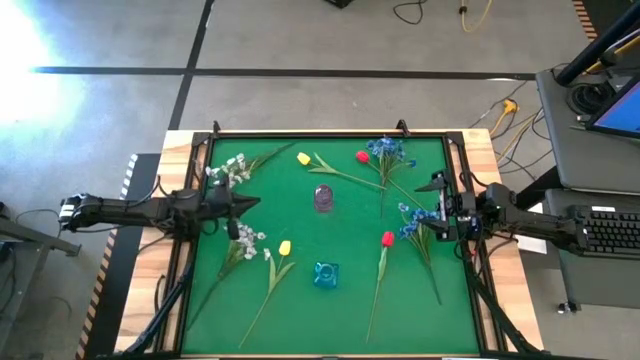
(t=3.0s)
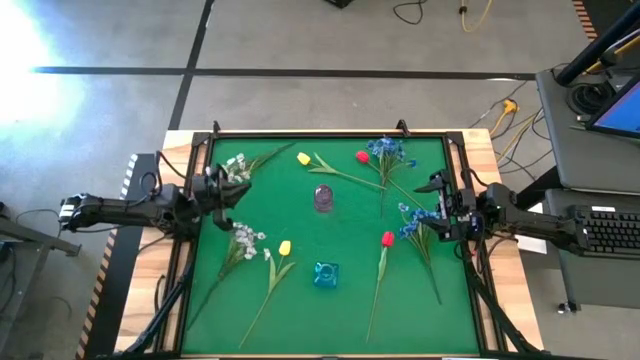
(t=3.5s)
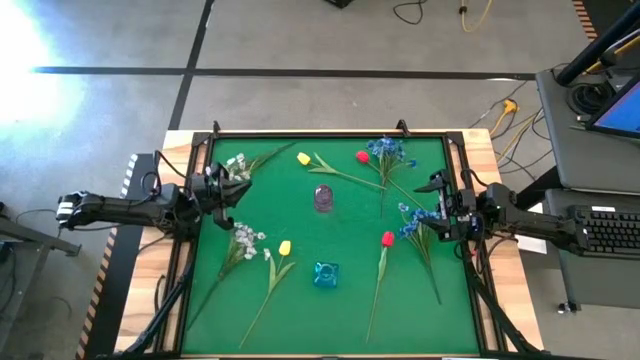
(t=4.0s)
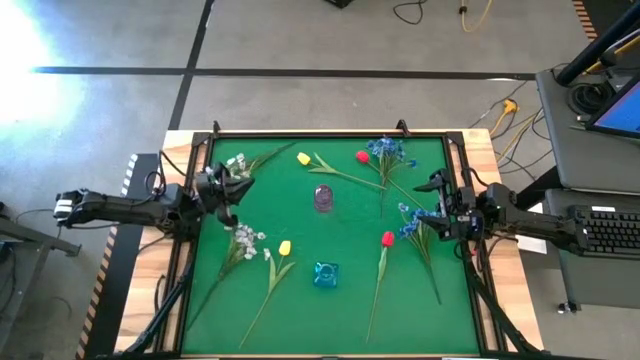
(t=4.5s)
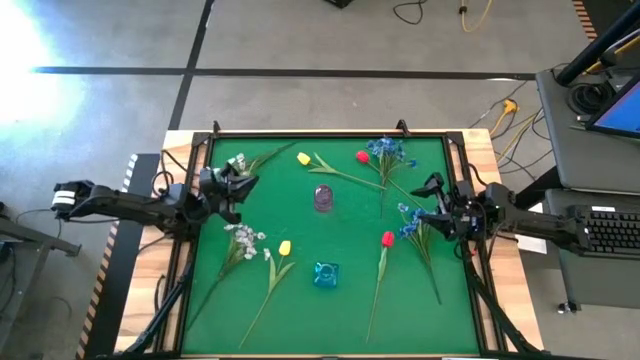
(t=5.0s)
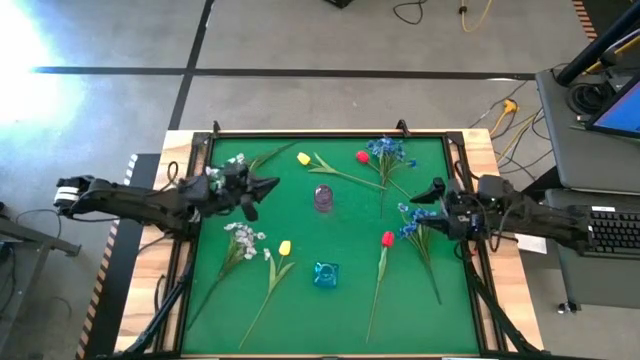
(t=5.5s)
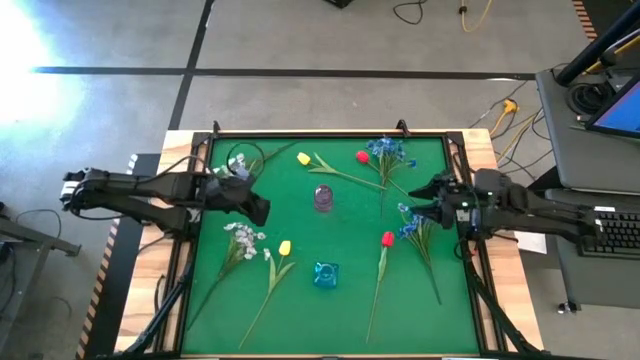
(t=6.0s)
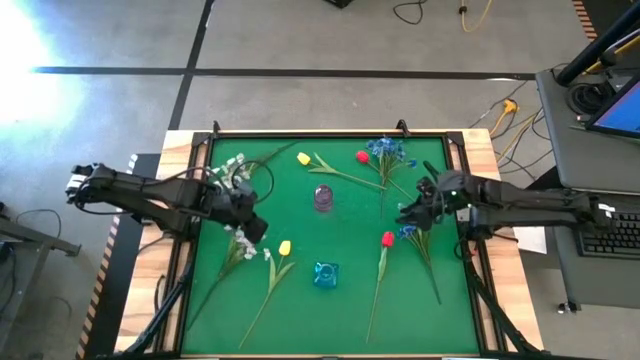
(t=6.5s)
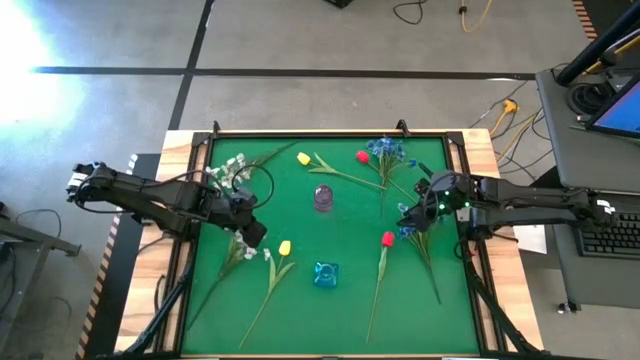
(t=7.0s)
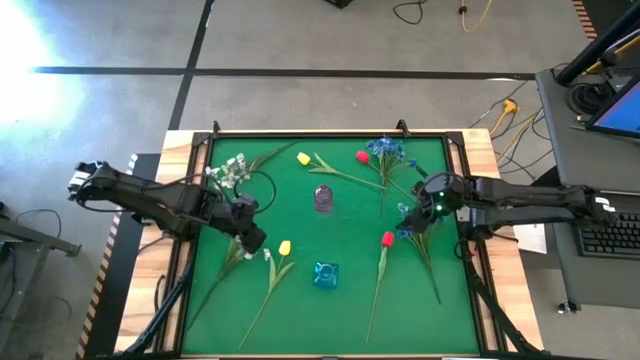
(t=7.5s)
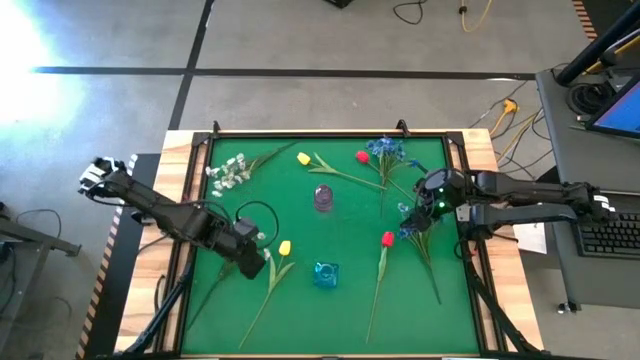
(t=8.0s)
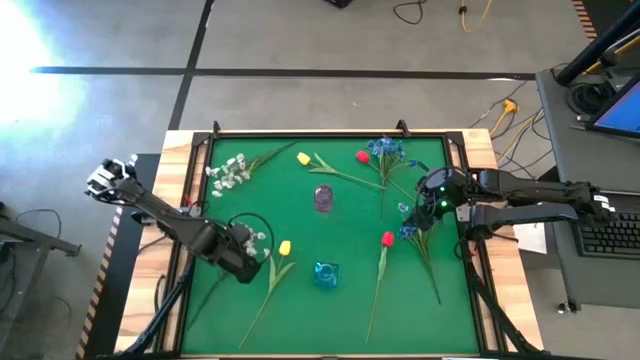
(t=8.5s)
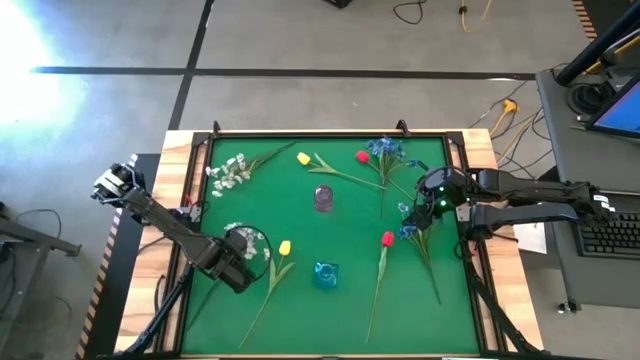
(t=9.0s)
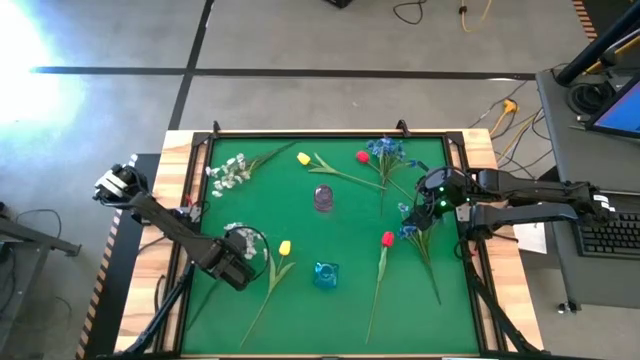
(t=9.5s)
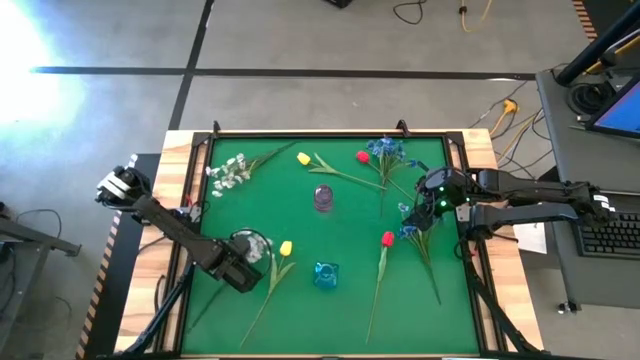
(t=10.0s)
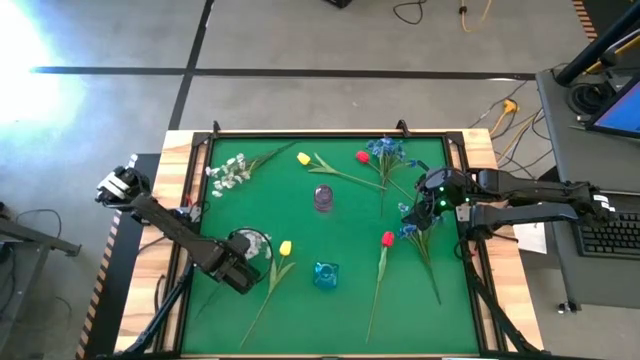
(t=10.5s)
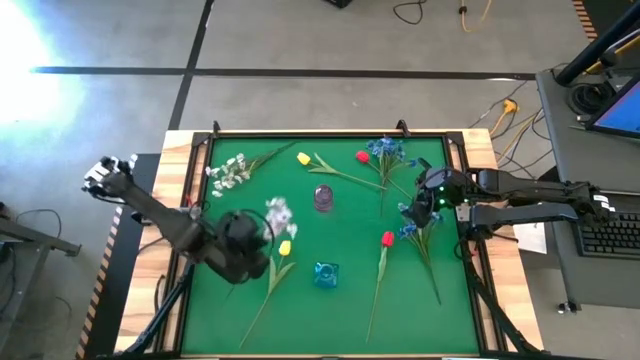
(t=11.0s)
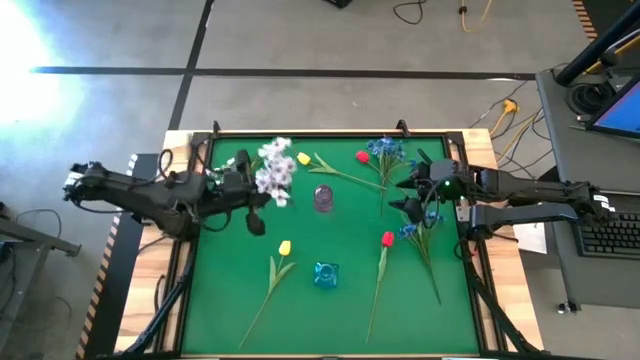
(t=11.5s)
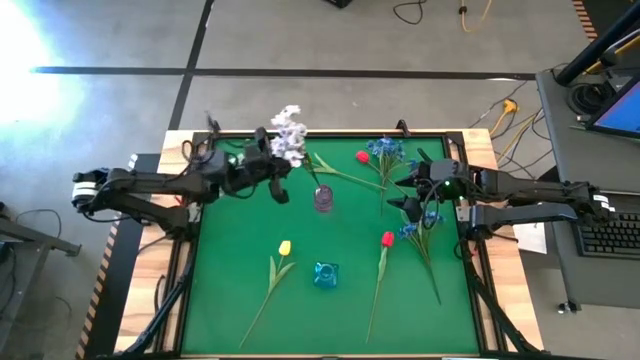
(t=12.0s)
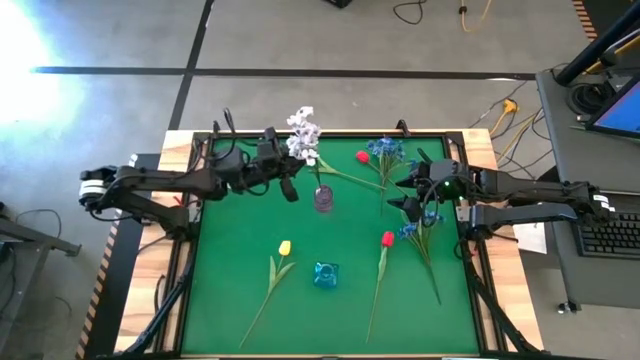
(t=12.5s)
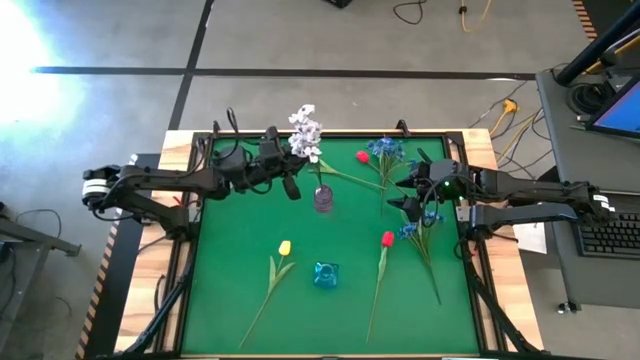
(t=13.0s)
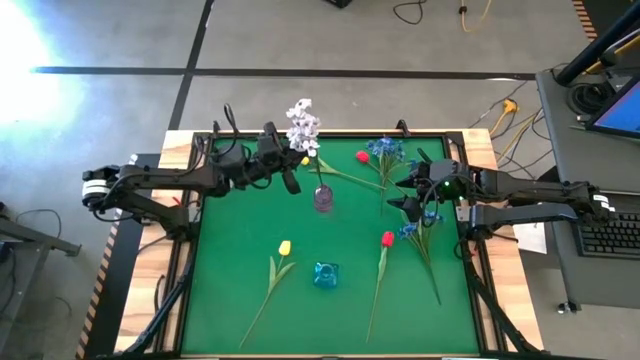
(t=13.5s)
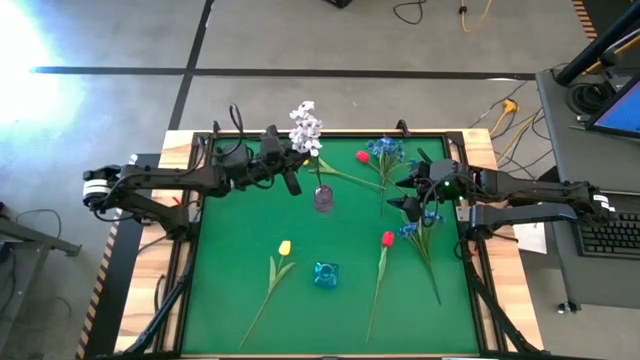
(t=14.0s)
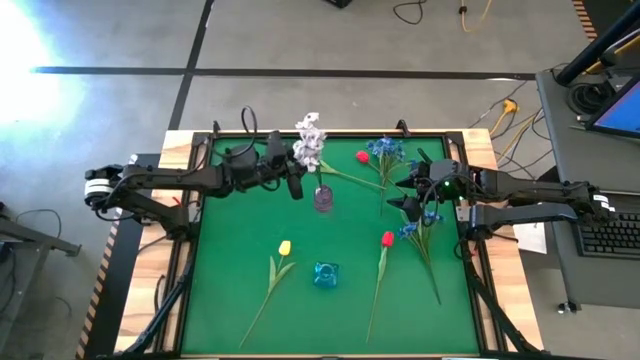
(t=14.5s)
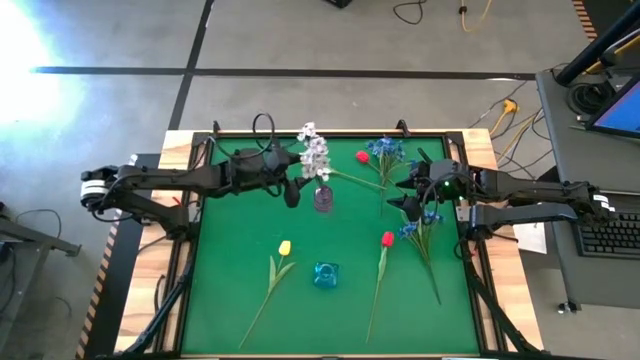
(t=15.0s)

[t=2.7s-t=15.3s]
Task: Sort flowers into vase by color
Put the bottom white flowers into the violet vase

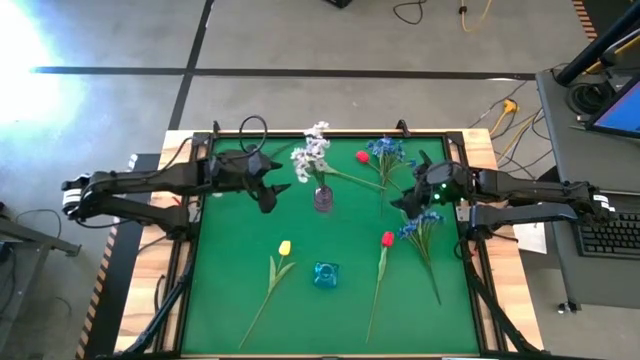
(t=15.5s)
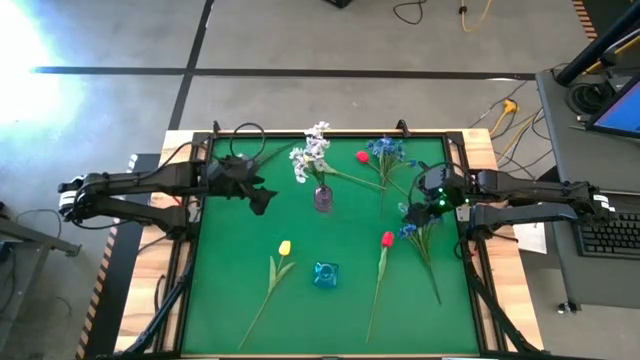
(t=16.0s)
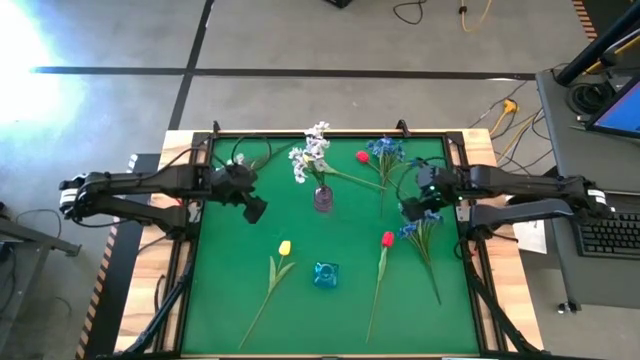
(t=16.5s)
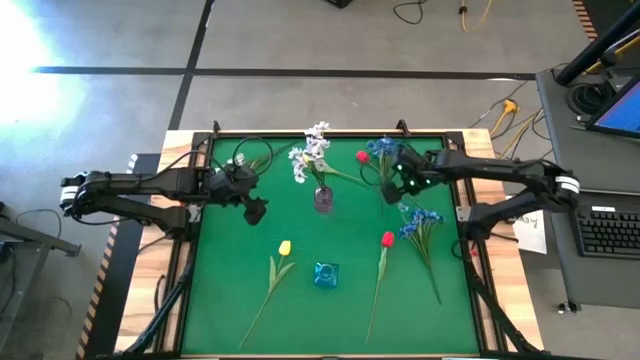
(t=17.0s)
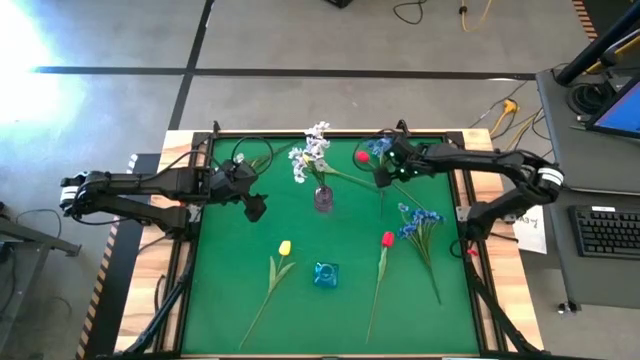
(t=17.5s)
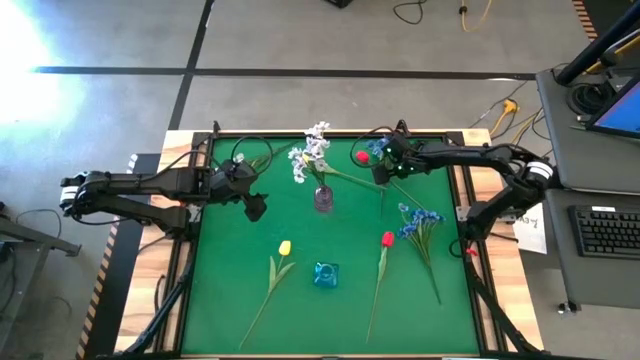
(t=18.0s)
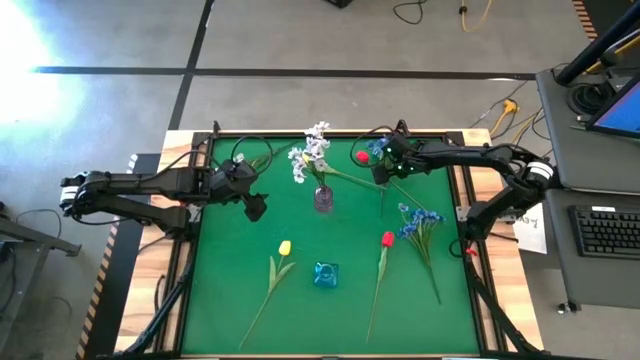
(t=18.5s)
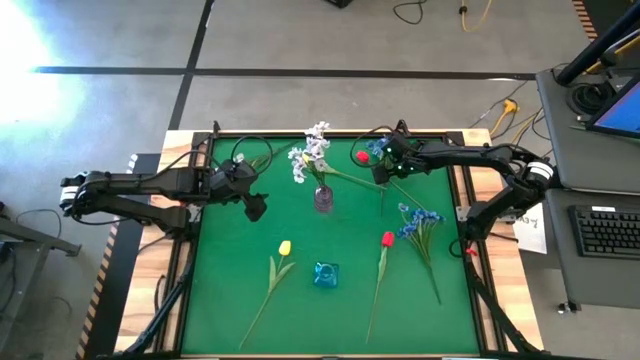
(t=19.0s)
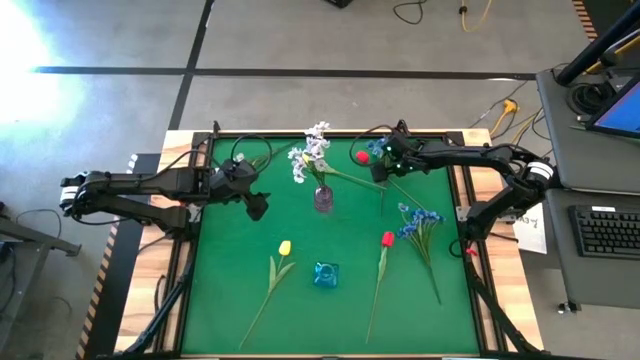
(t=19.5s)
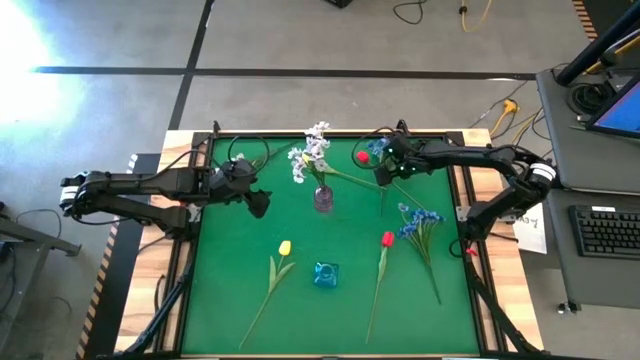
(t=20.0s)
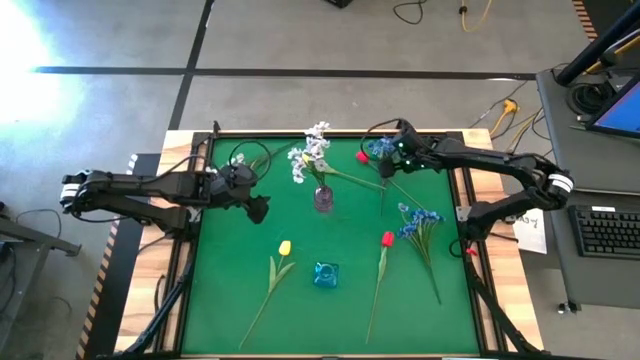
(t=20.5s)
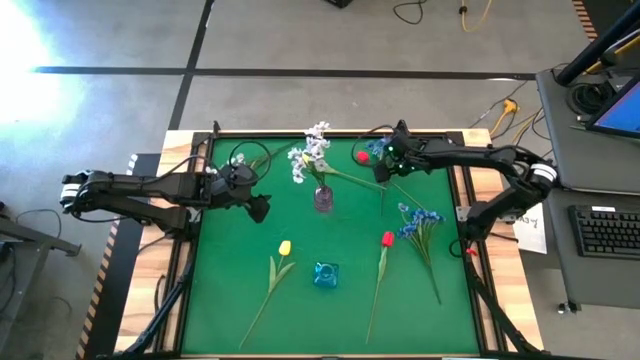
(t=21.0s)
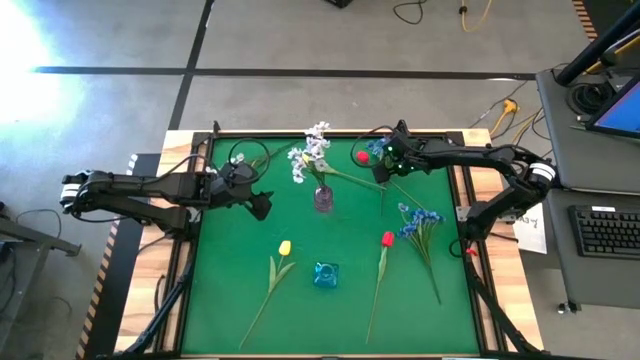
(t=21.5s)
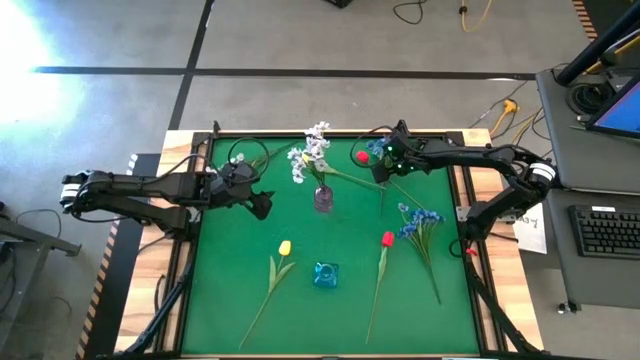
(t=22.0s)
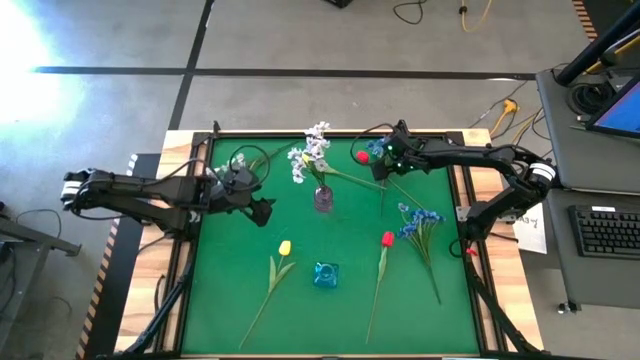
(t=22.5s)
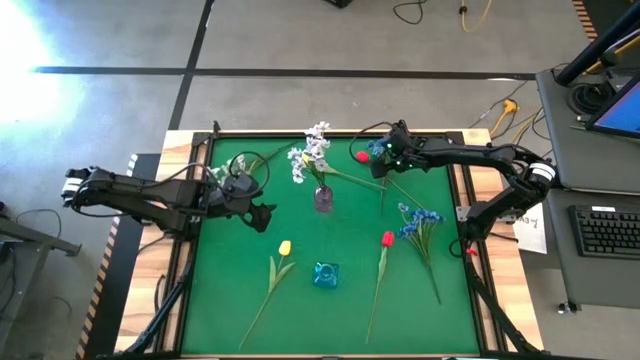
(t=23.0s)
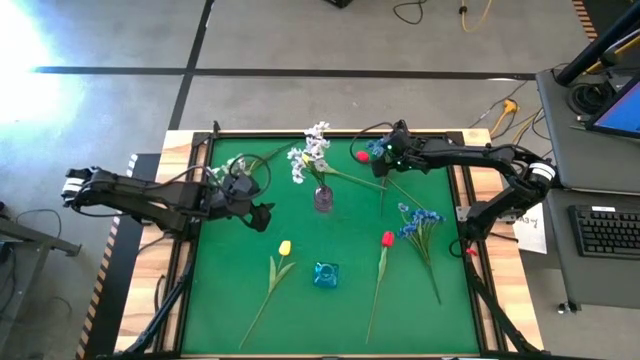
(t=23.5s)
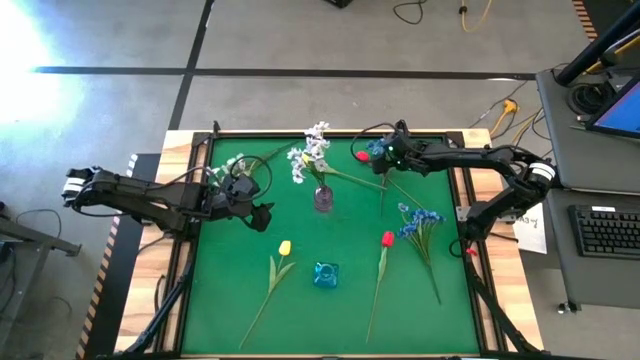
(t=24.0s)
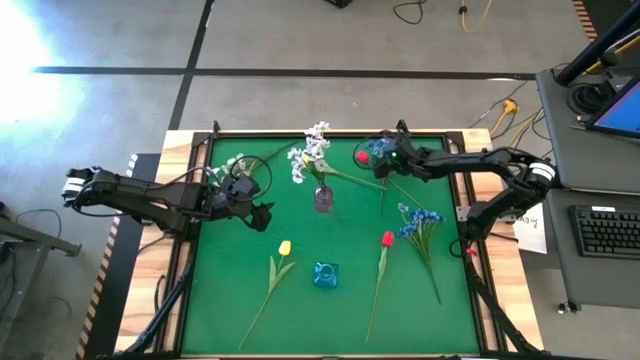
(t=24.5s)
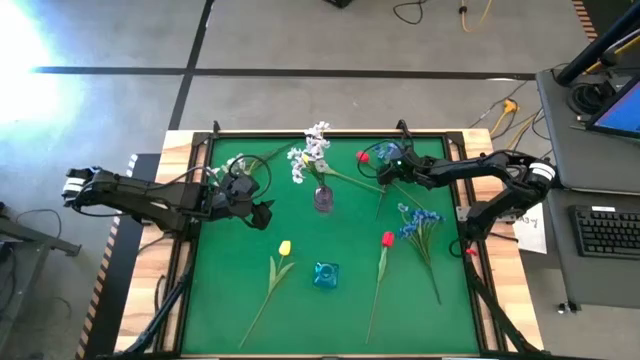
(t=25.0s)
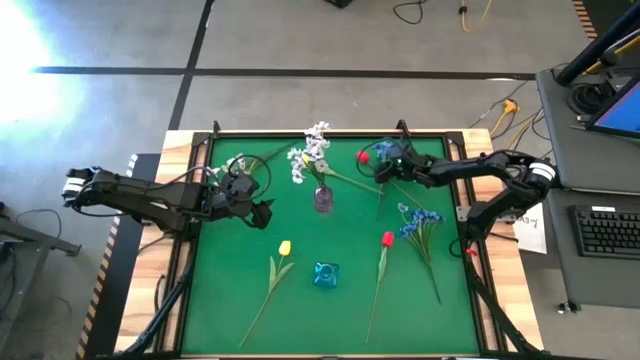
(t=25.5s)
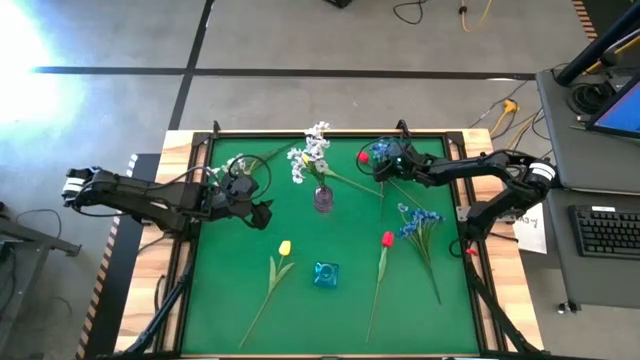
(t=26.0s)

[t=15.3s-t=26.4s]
Put the top blue flowers into the blue vase
